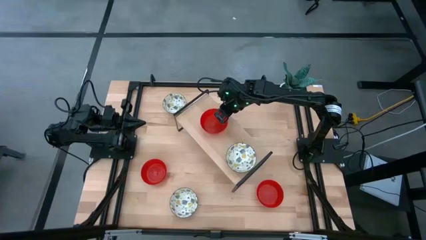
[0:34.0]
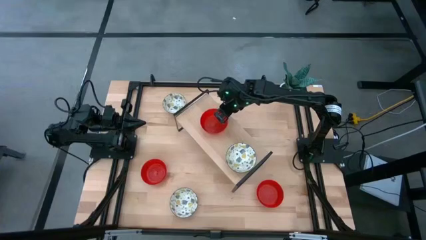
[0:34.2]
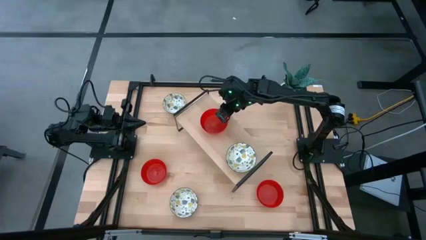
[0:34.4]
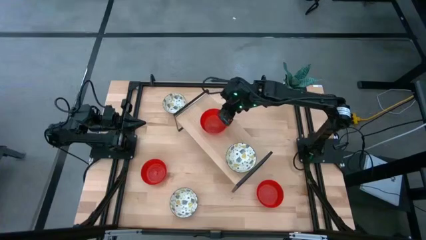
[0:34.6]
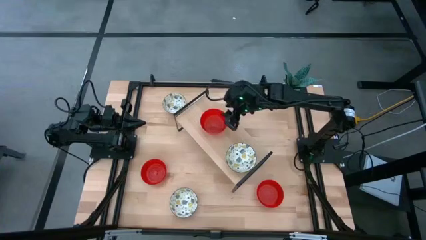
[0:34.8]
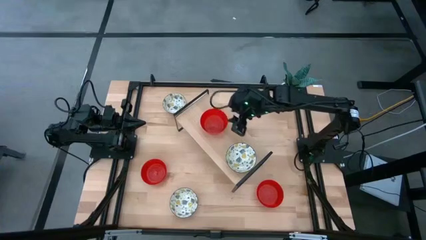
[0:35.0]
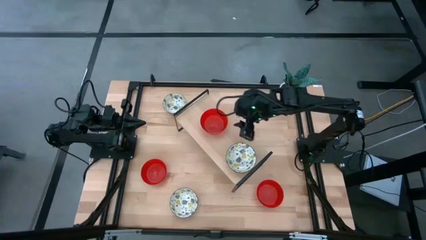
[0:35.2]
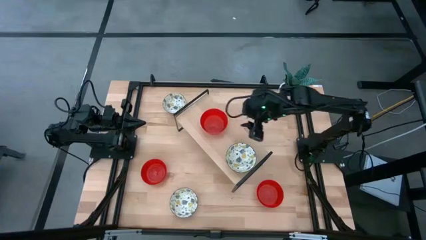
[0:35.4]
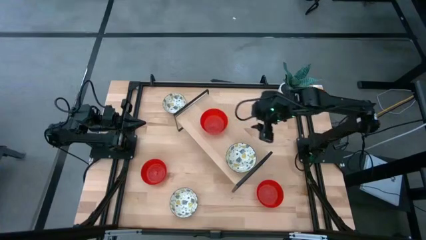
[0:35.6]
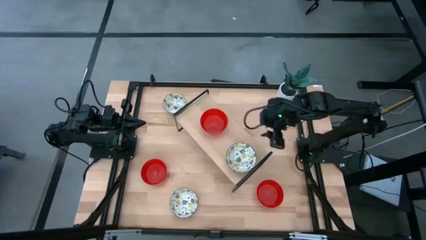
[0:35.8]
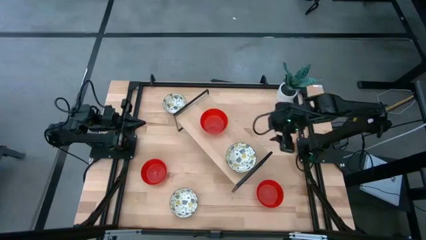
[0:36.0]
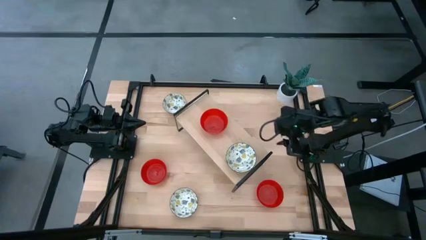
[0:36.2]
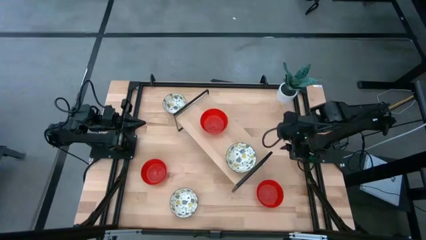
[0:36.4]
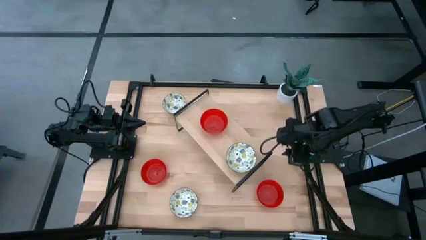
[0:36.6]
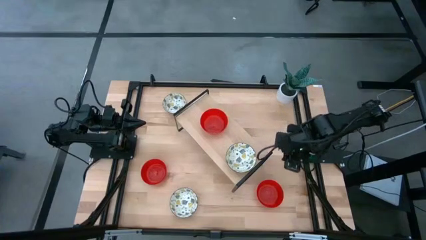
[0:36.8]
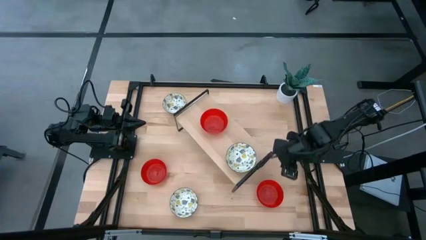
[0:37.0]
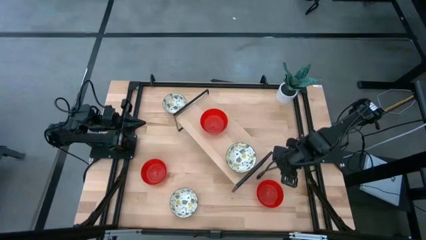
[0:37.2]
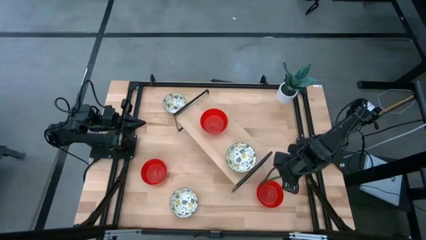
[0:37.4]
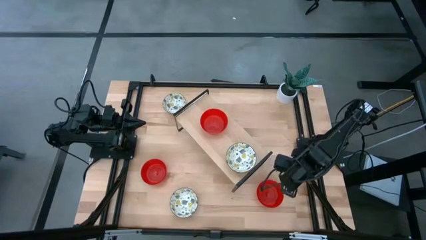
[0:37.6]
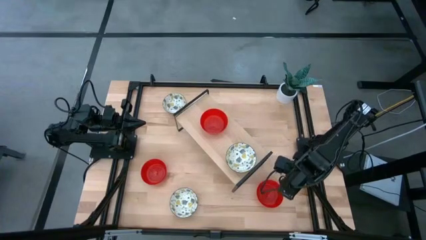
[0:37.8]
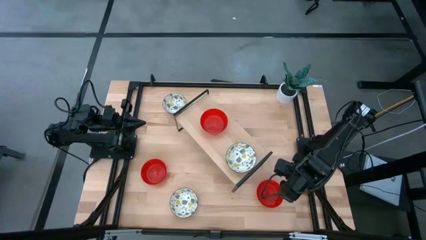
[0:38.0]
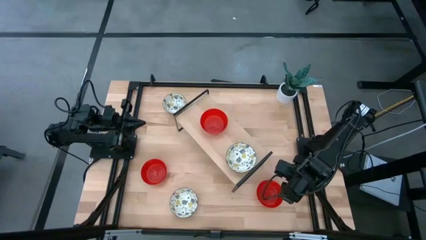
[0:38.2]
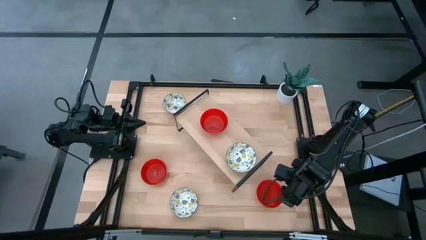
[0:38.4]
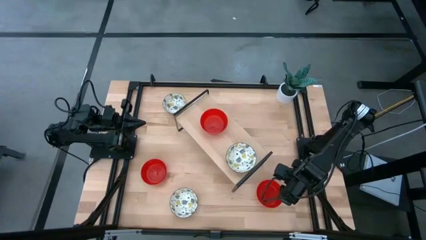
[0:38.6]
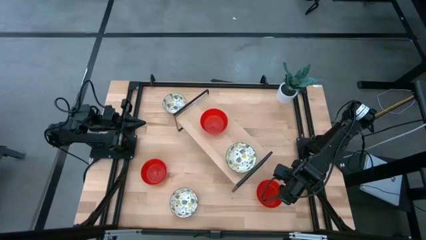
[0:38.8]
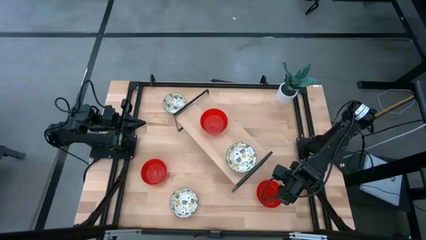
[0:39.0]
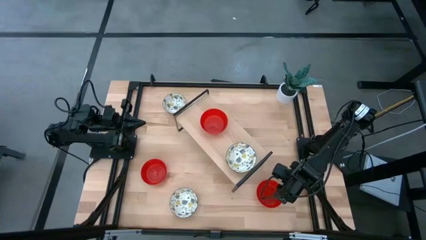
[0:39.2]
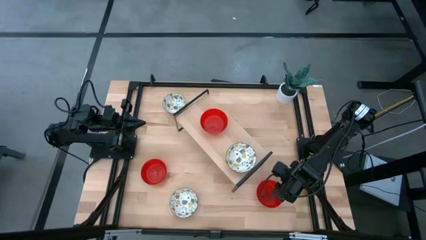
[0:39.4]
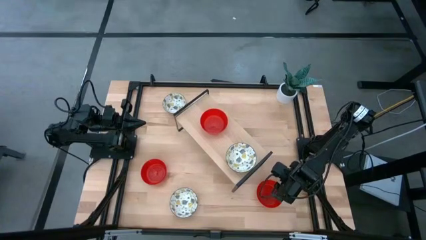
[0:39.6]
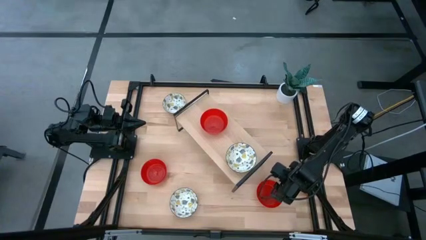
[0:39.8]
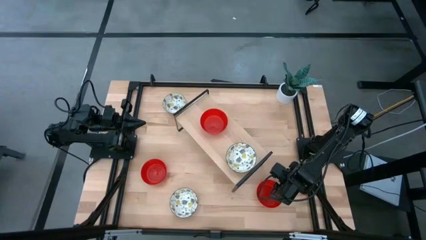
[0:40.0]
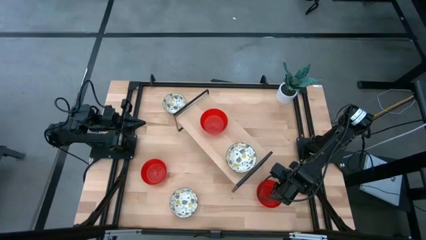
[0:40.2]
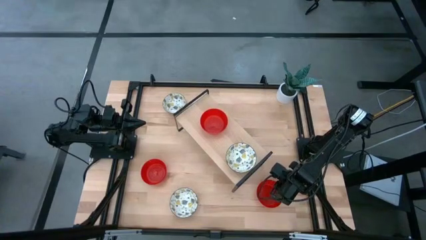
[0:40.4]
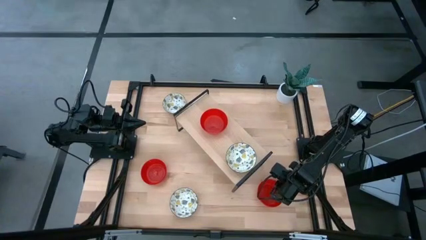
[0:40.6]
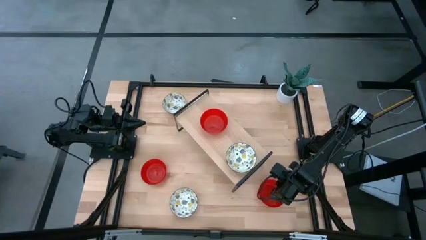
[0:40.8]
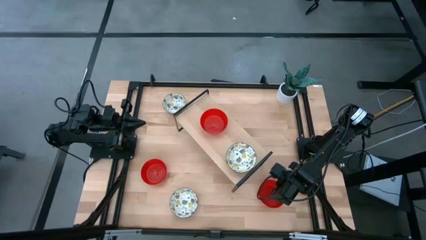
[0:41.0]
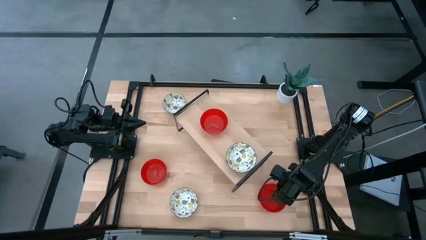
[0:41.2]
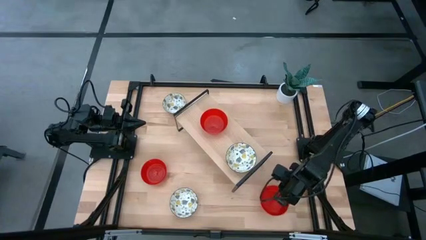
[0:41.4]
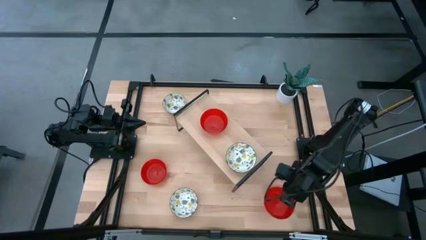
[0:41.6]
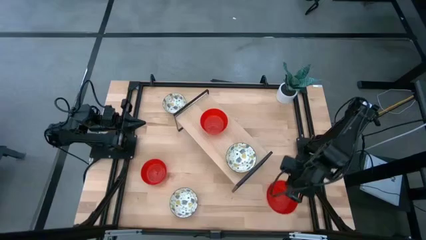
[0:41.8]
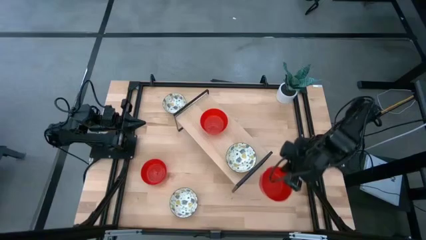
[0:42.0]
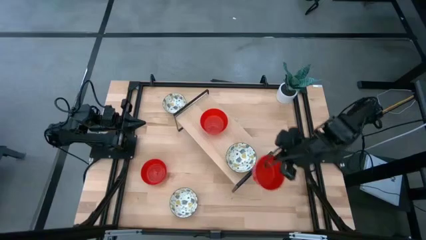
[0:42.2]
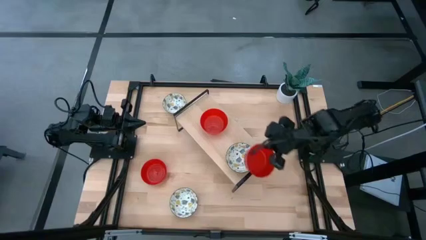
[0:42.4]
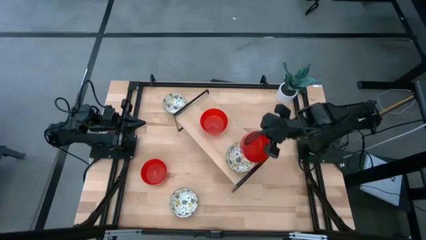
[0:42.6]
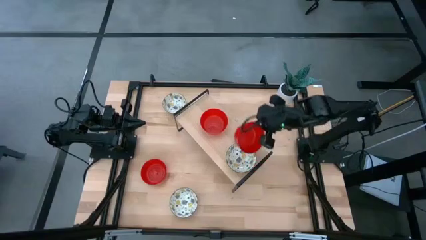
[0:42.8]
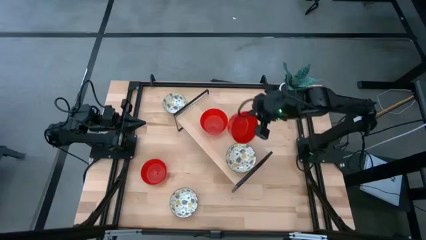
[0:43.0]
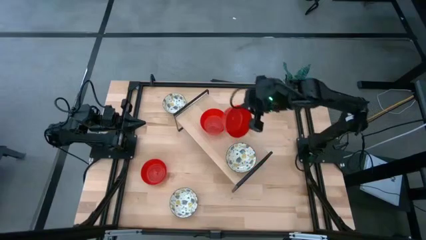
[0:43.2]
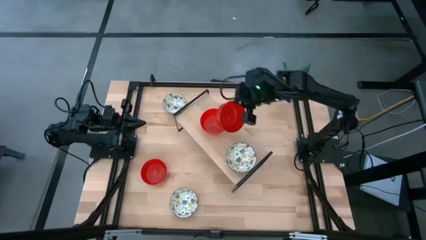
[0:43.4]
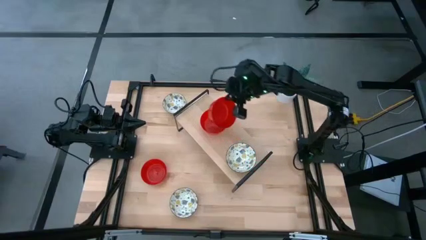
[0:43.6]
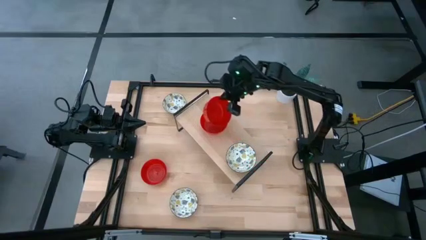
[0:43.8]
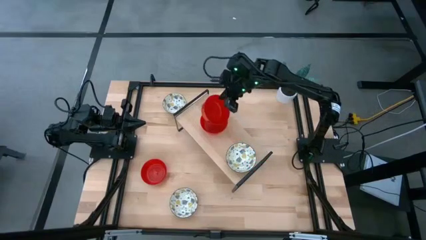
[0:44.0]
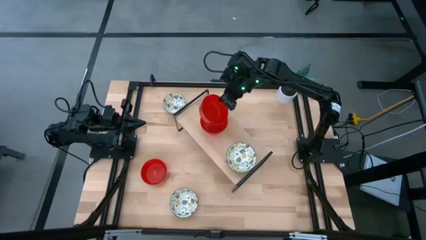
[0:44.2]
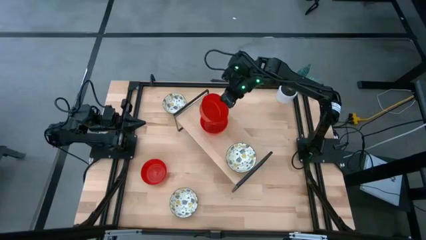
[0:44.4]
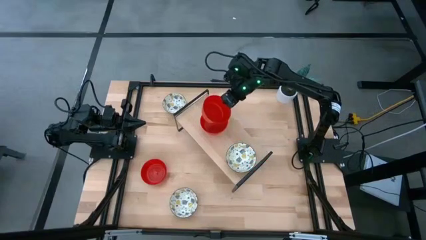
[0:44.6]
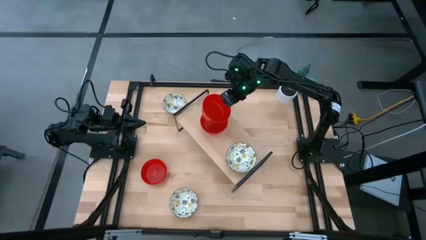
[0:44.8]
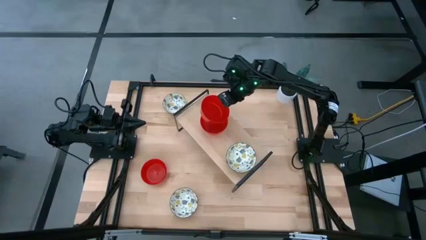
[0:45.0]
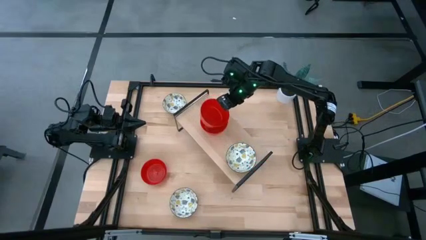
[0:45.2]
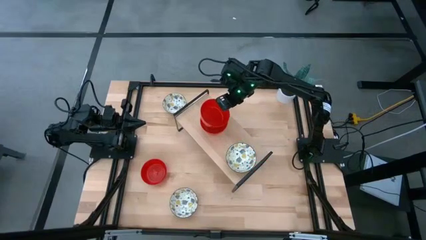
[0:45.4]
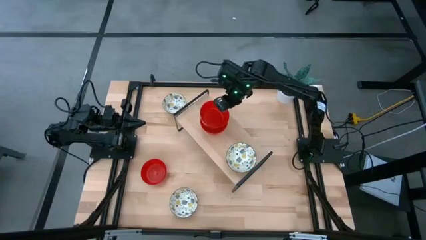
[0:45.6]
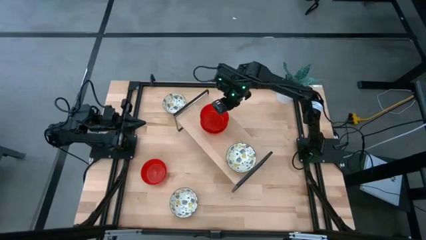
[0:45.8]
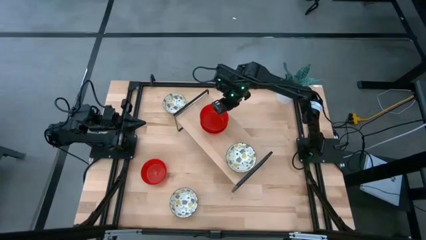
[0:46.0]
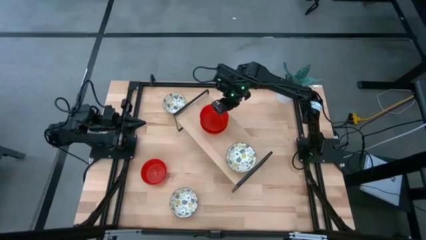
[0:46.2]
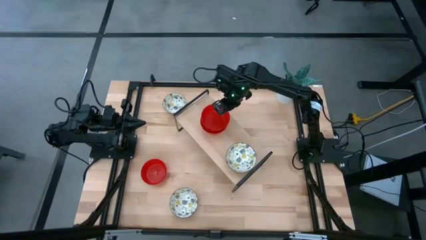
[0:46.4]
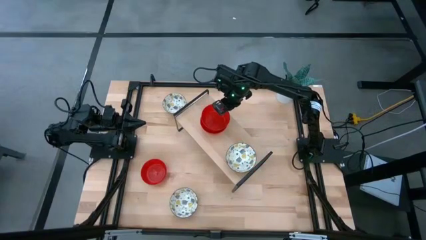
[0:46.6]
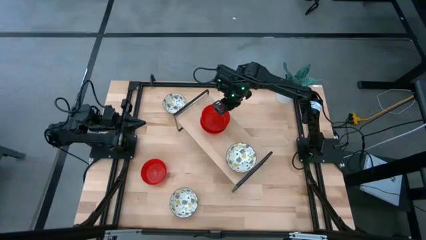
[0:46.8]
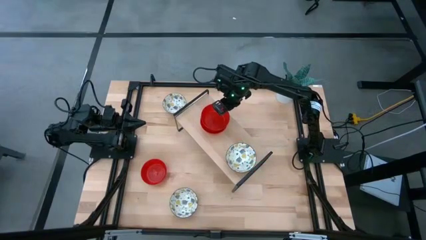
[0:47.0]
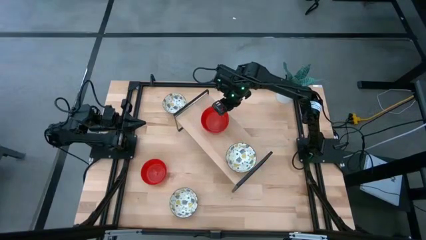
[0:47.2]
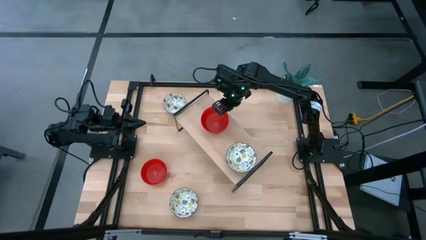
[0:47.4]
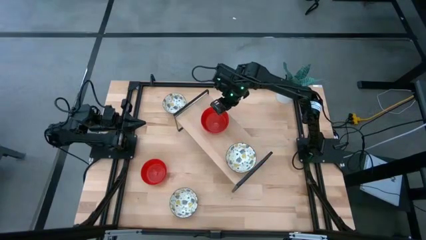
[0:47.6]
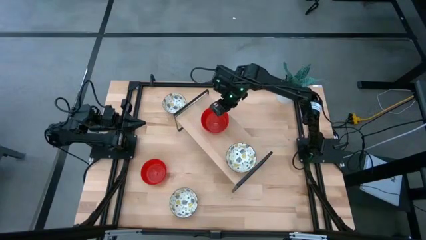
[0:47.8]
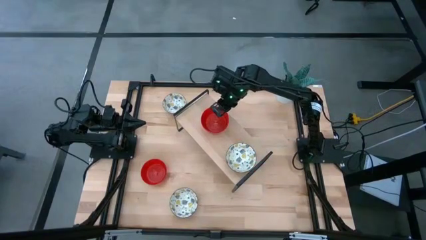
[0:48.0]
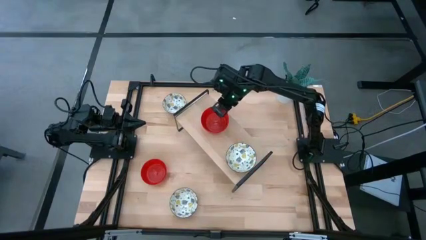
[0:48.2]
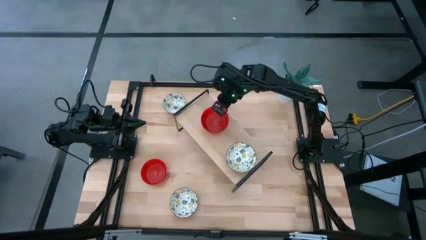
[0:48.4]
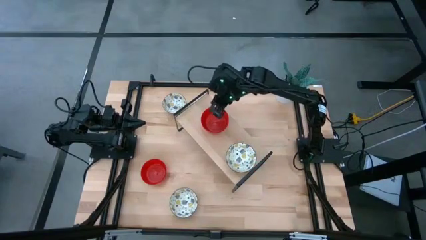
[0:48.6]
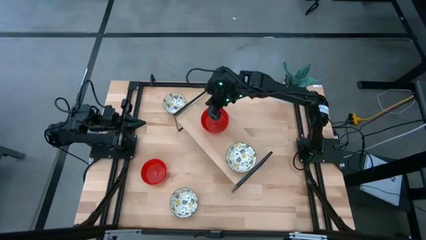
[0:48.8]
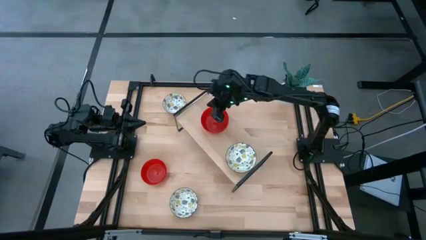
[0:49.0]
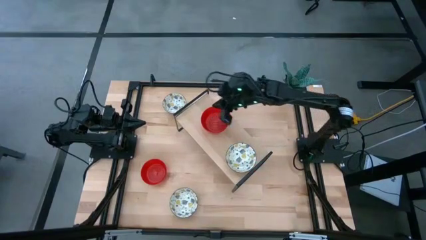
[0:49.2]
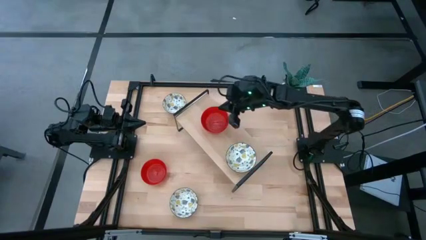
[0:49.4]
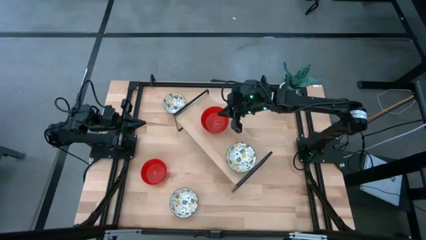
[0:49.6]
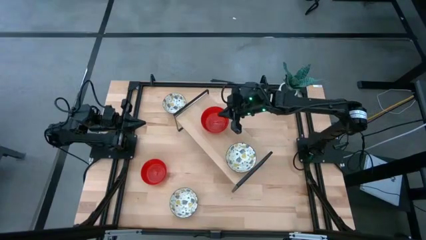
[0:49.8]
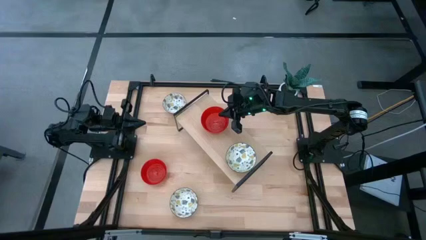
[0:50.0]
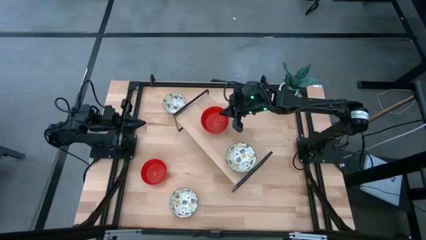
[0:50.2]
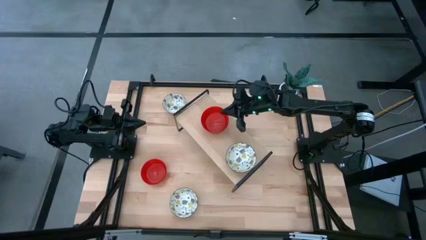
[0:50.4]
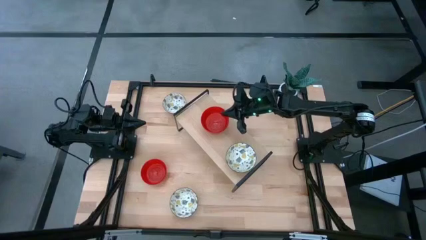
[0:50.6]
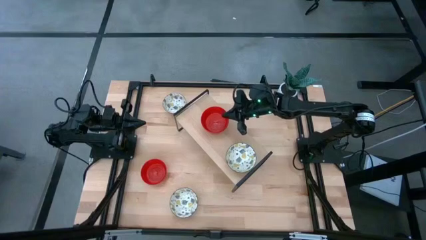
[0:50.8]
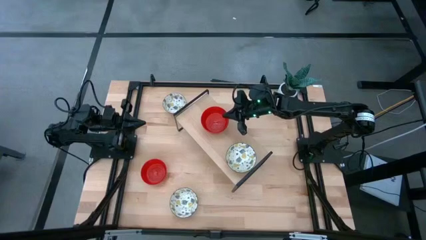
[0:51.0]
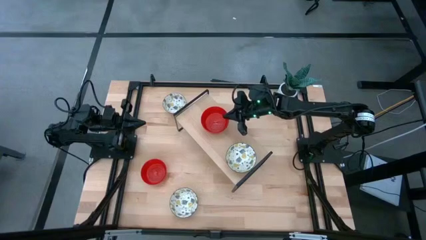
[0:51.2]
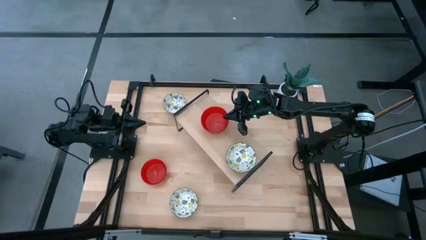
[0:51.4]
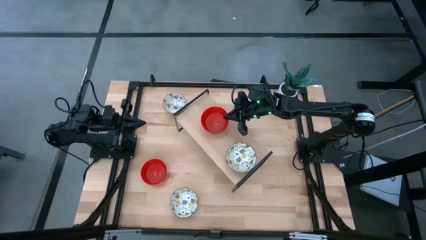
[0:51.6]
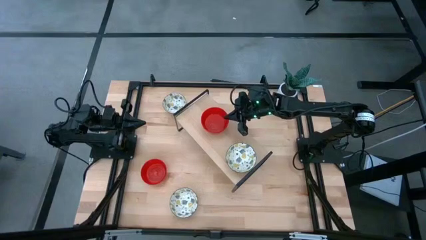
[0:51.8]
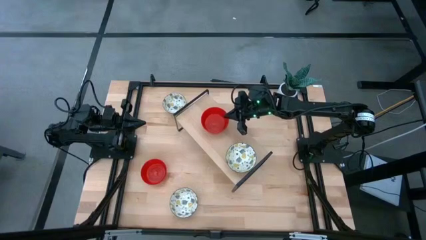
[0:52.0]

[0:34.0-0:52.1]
Task: Pick & Place Mini bowls
Stack the right red bowl on top of the red bowl on the shelf
